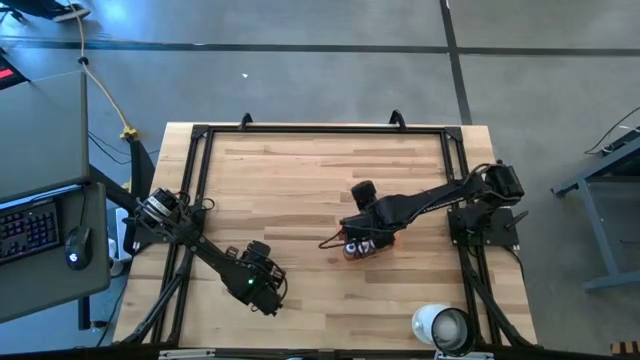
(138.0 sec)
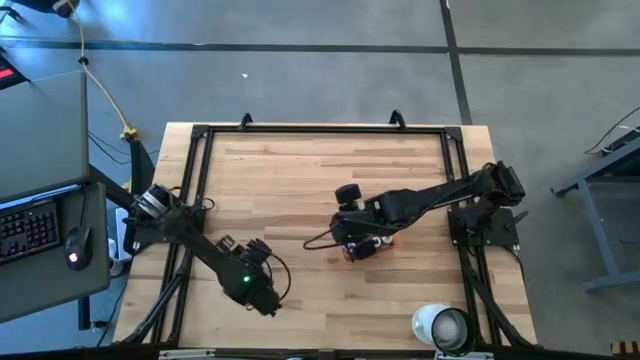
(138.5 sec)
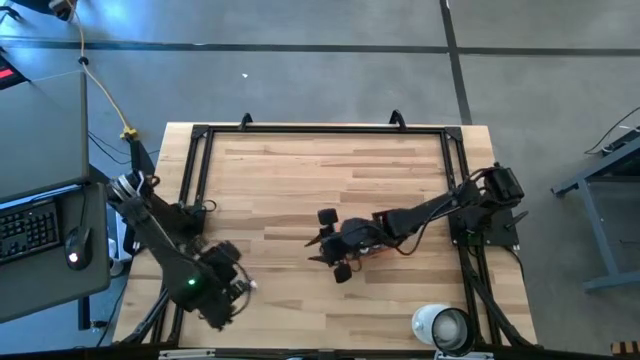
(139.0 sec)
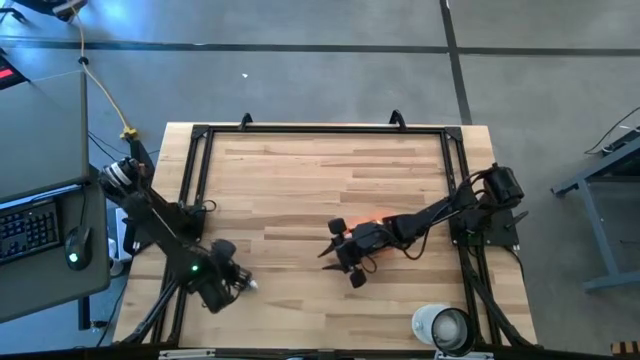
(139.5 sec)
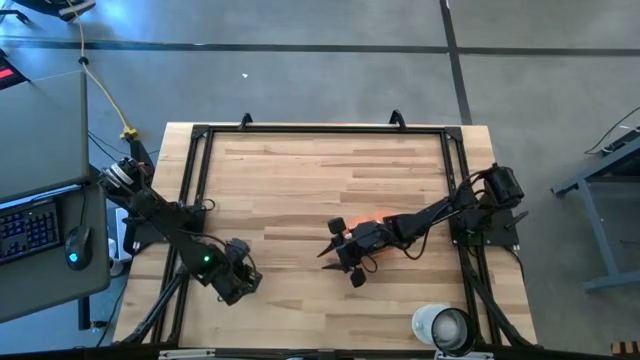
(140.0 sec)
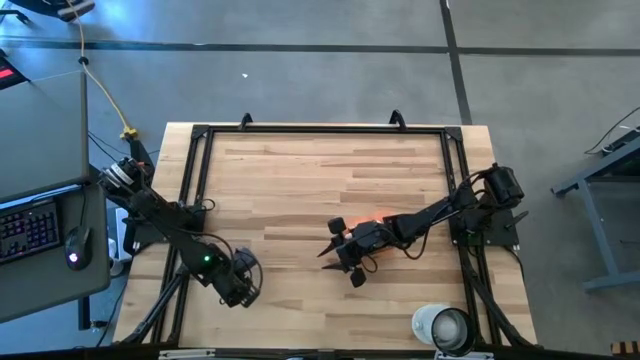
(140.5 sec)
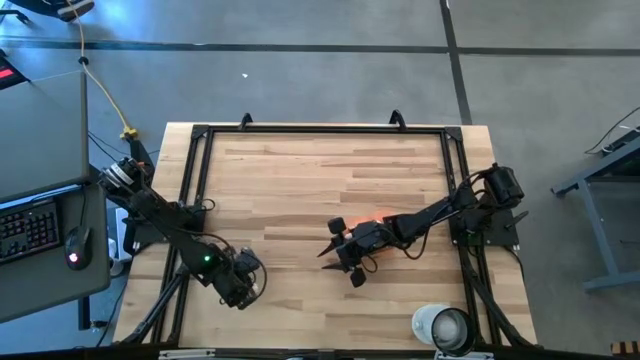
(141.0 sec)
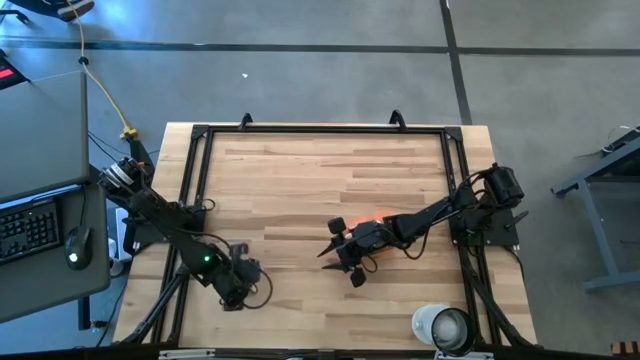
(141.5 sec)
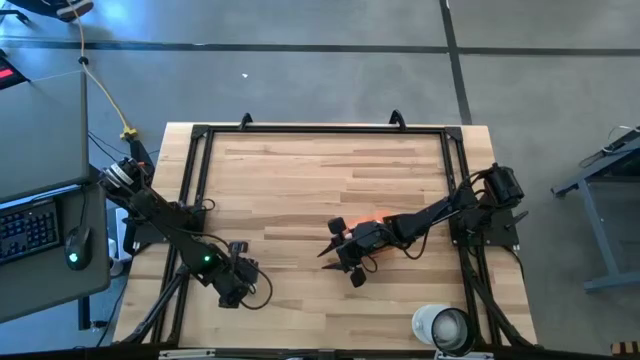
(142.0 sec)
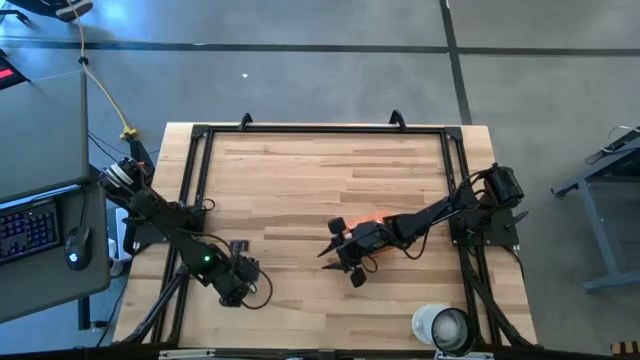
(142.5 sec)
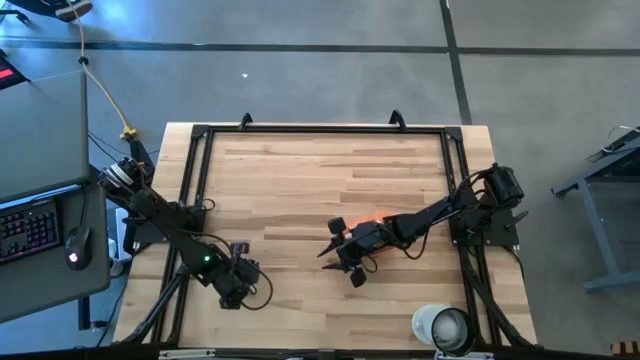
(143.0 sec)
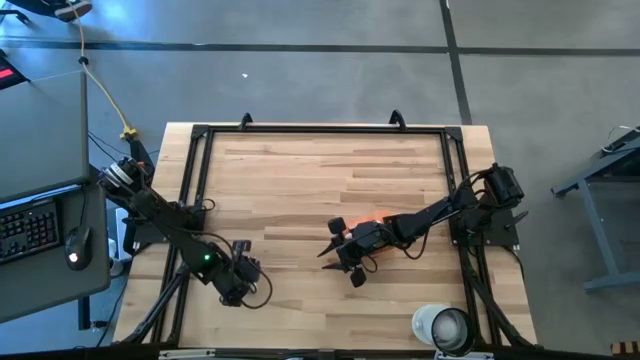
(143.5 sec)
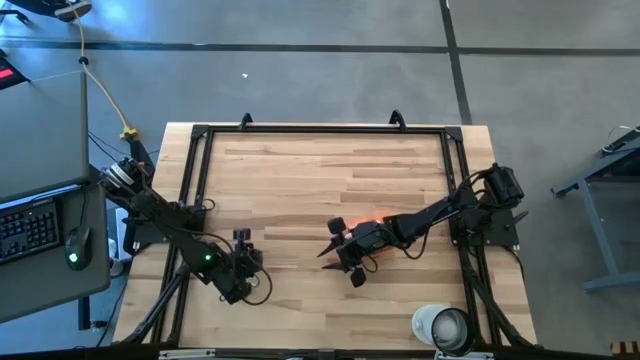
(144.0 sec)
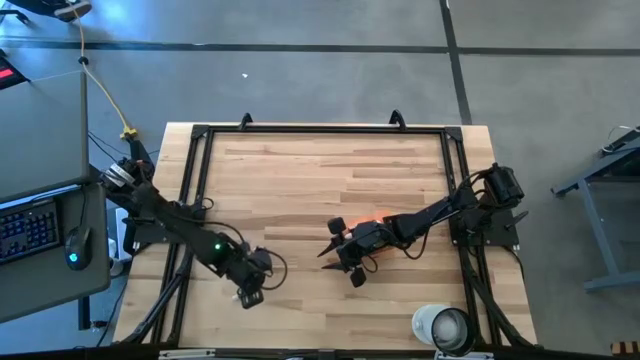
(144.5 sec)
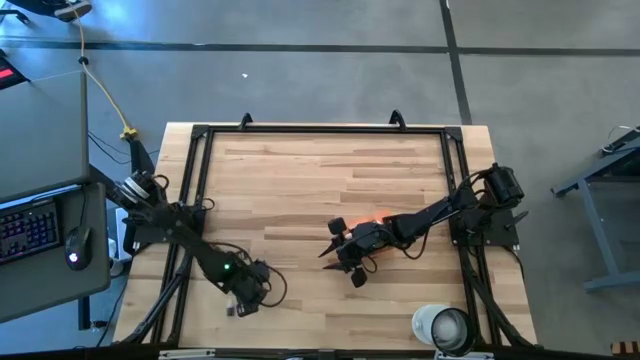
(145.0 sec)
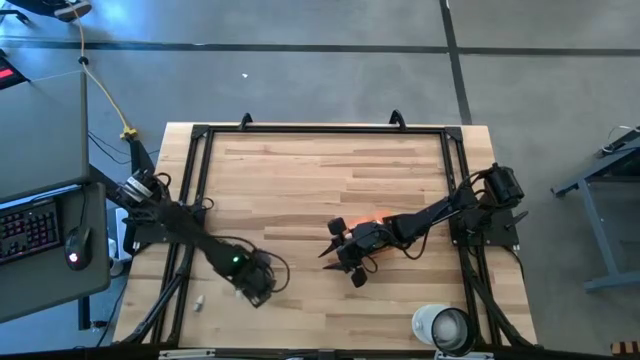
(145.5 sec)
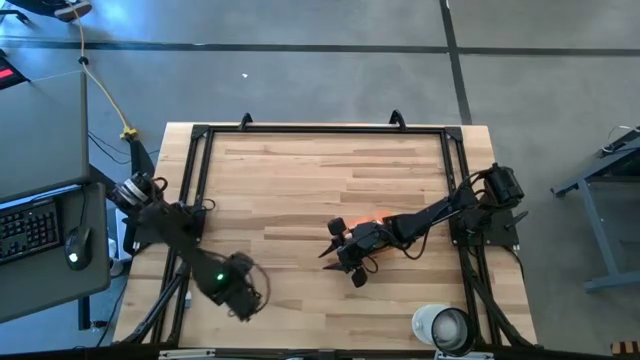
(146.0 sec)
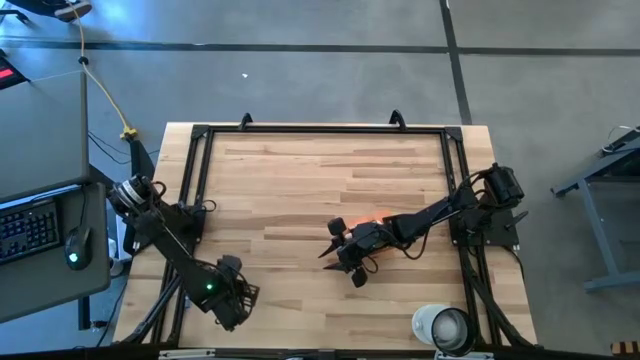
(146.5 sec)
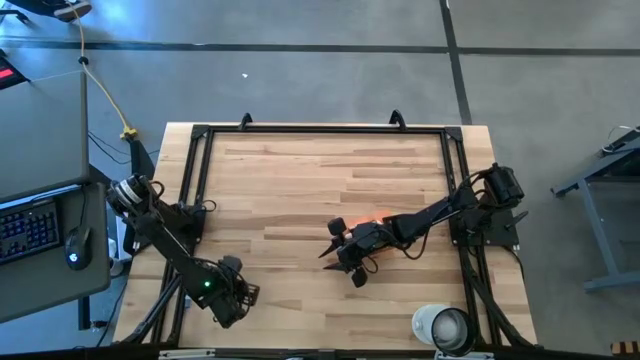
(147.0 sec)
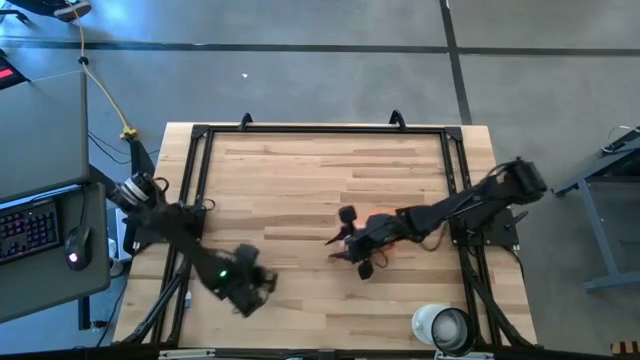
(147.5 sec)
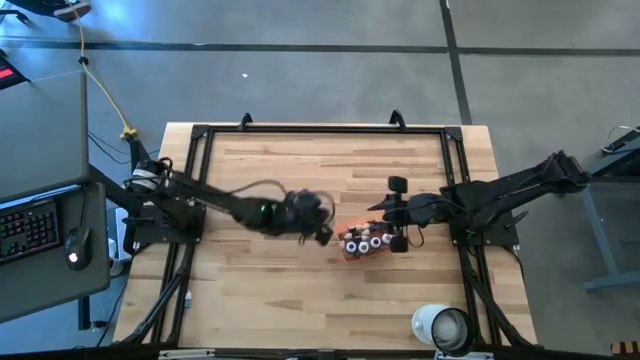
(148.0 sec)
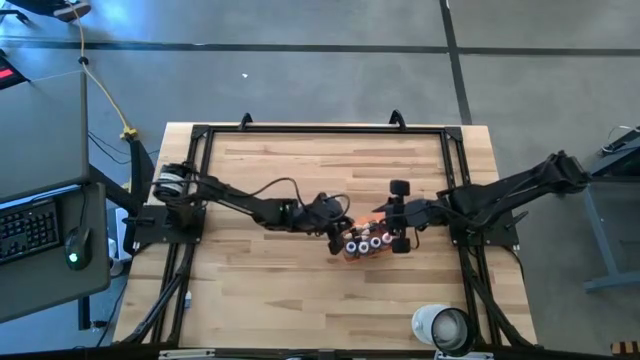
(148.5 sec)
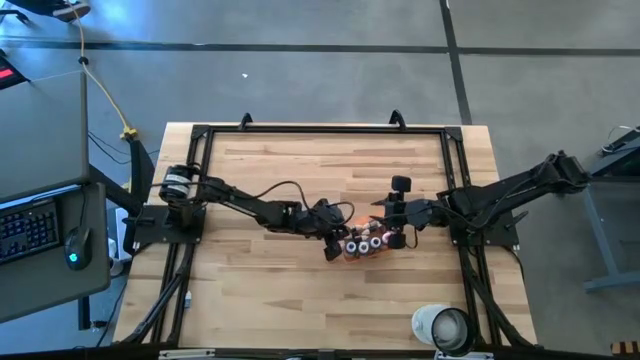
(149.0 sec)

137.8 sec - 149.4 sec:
Task: Pick & Place food coloring
Put the small purple food coloring bottle into the orange bin

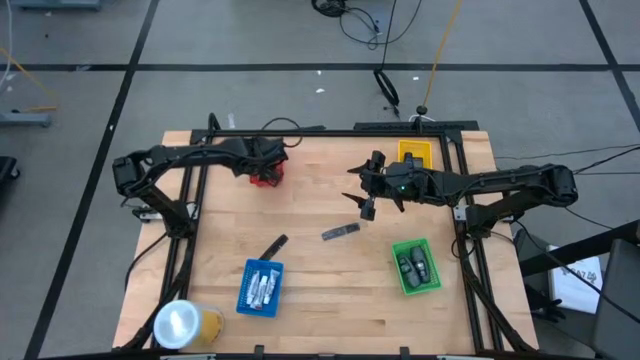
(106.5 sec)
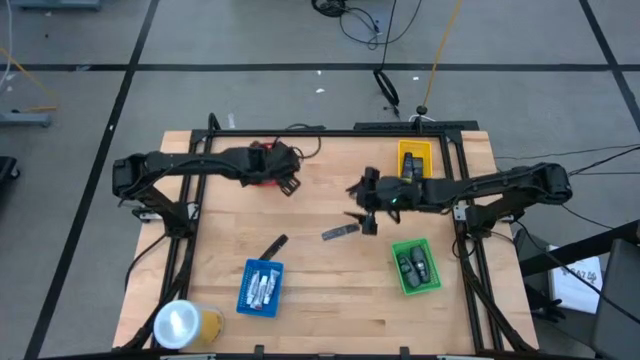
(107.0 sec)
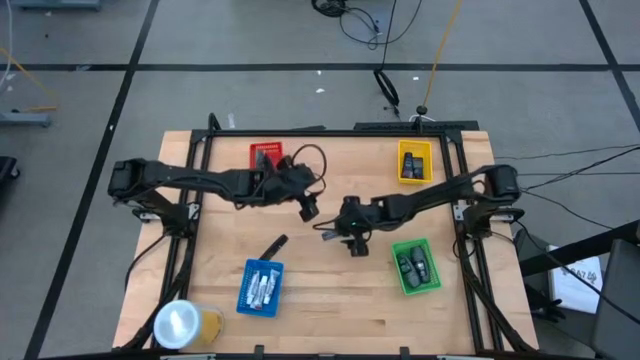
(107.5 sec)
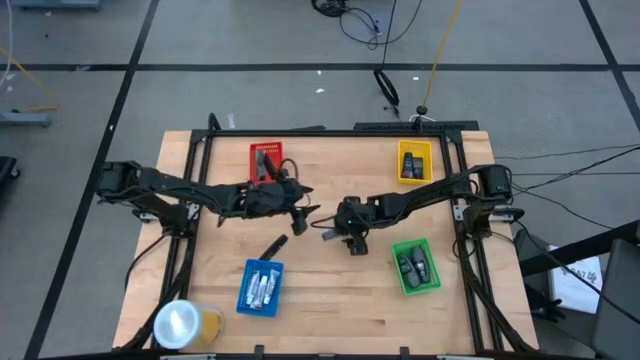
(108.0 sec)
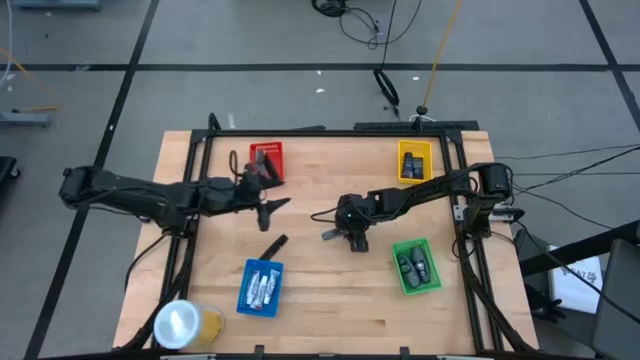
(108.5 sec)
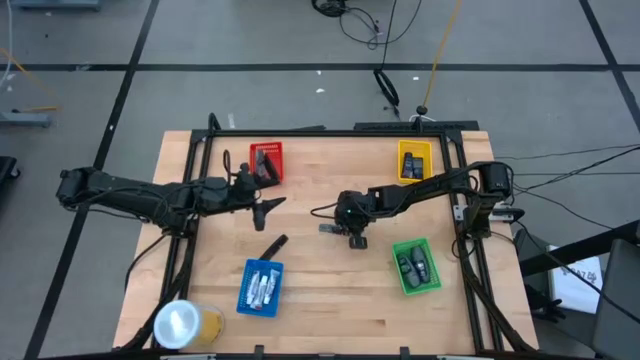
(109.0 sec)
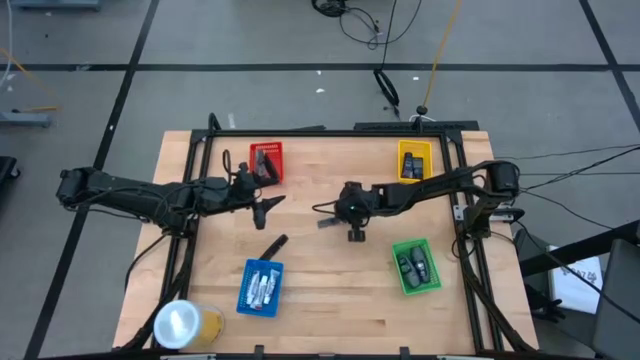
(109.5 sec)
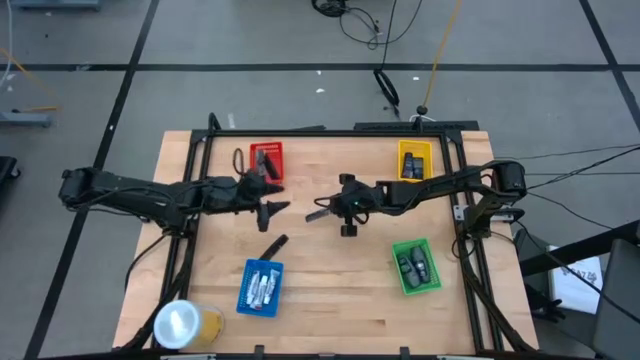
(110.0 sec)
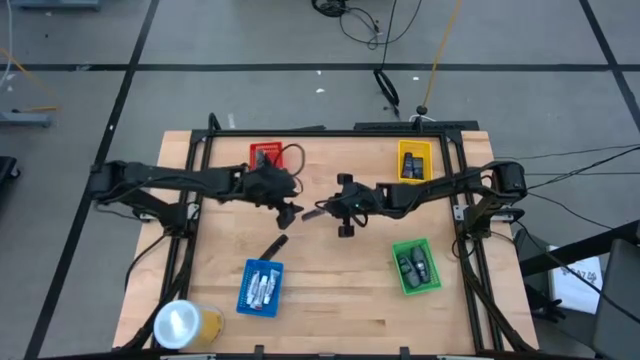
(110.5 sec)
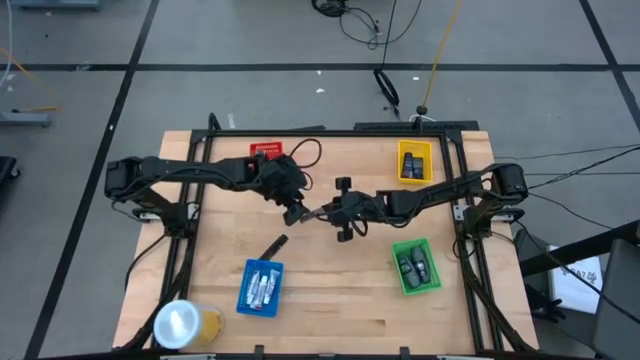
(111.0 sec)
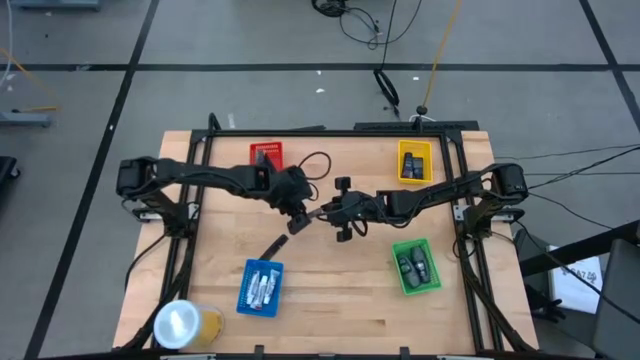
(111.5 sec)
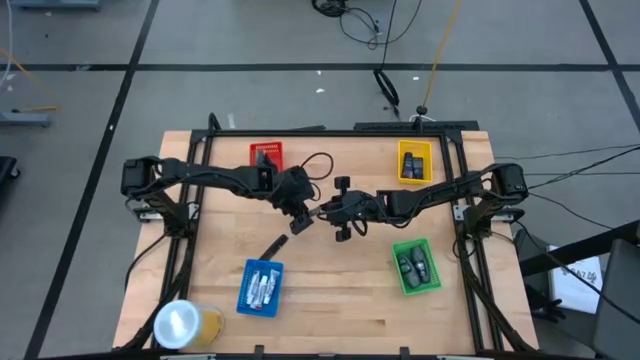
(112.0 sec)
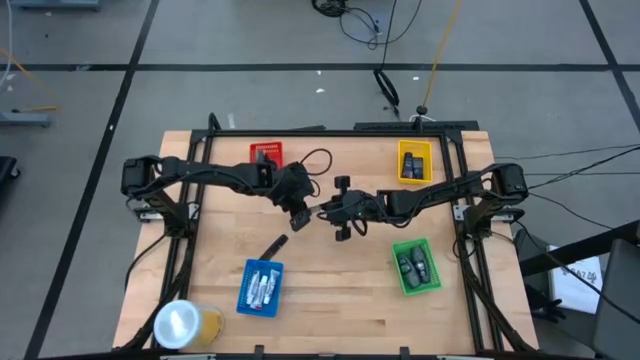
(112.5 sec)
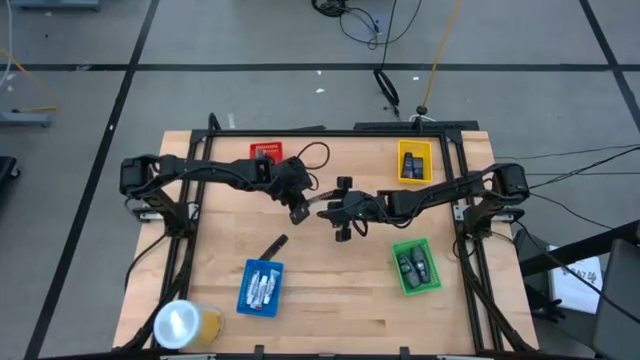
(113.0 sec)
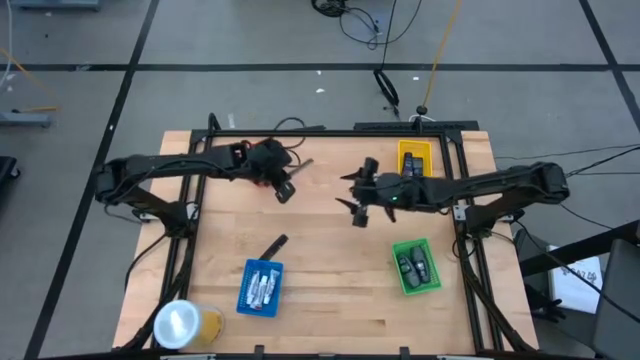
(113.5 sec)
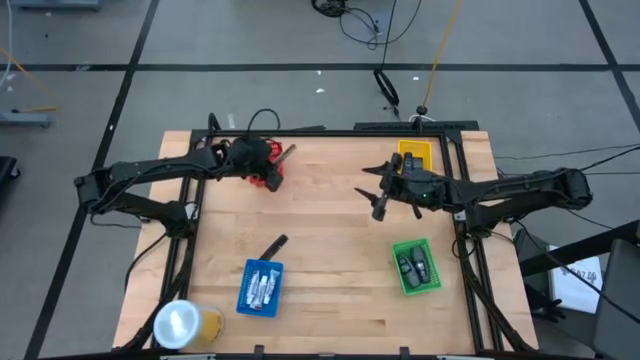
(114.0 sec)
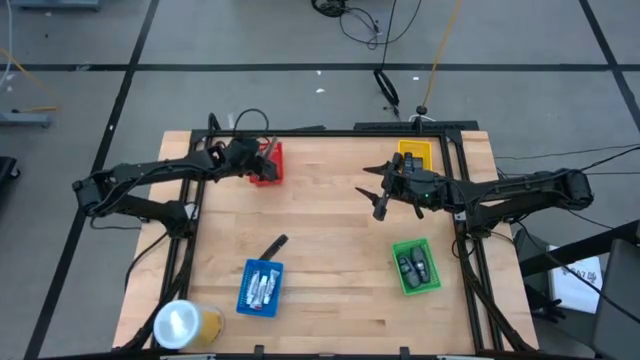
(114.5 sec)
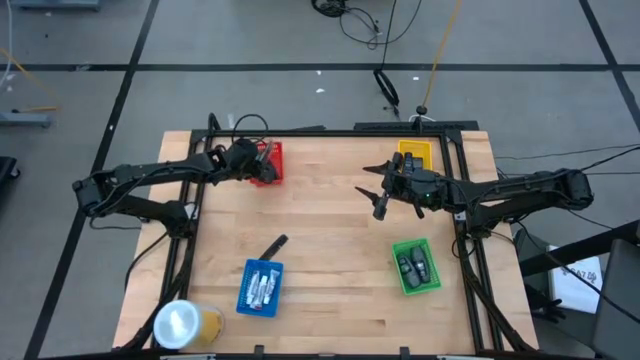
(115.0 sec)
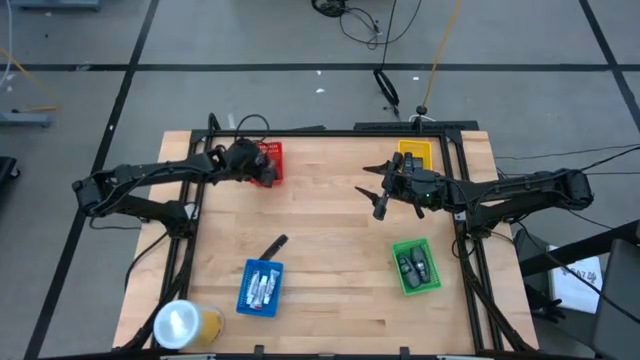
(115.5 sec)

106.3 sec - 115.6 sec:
Task: Pick & Place Travel size toiletries
Put the right black comb in plastic wrap into the orange basket
